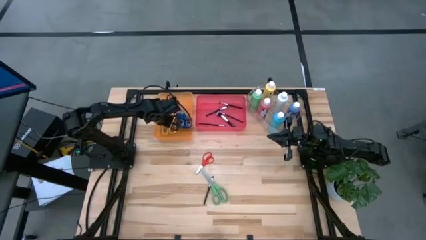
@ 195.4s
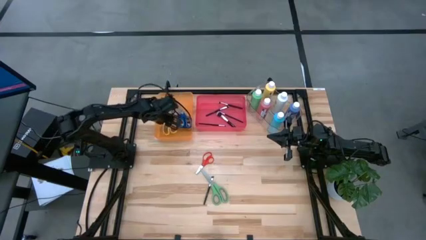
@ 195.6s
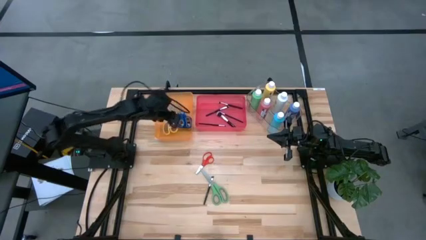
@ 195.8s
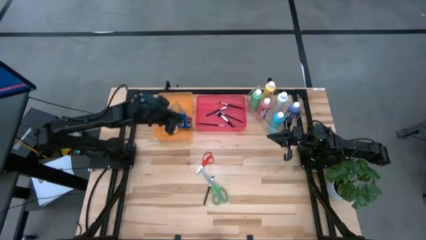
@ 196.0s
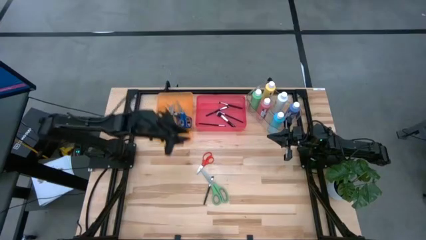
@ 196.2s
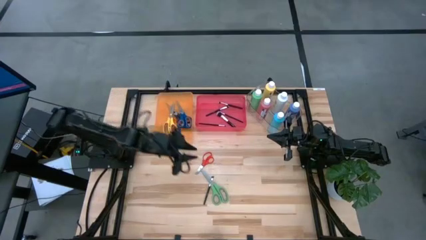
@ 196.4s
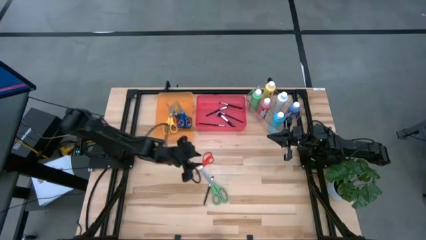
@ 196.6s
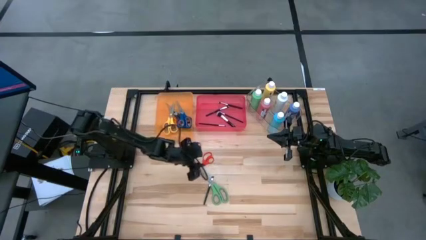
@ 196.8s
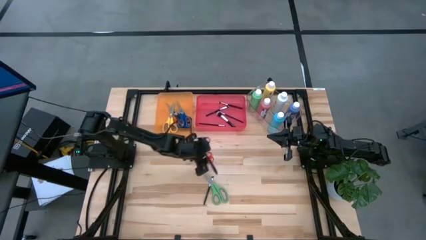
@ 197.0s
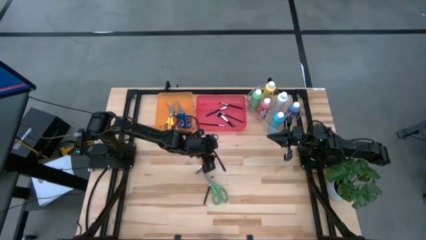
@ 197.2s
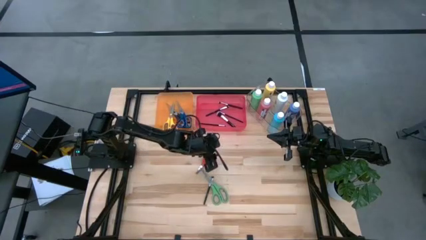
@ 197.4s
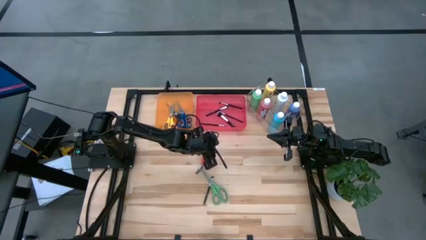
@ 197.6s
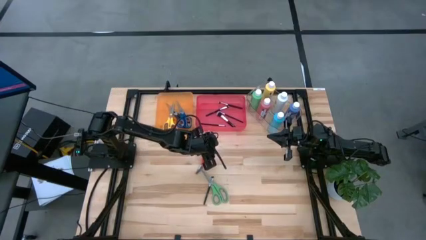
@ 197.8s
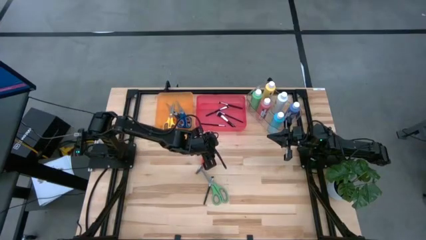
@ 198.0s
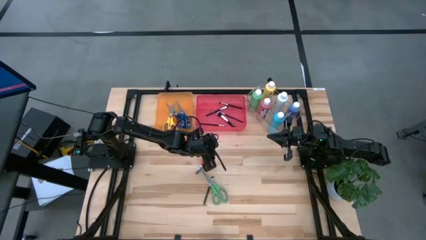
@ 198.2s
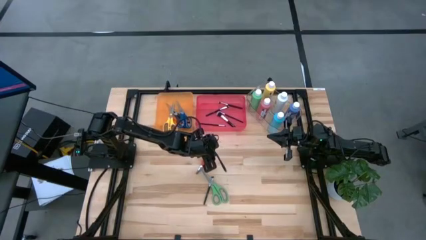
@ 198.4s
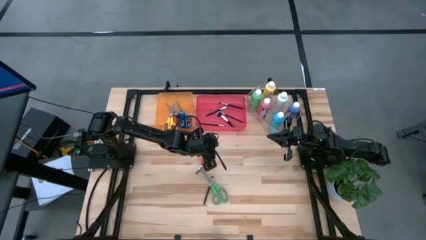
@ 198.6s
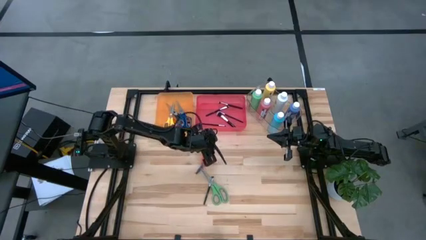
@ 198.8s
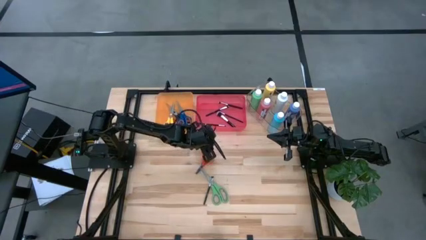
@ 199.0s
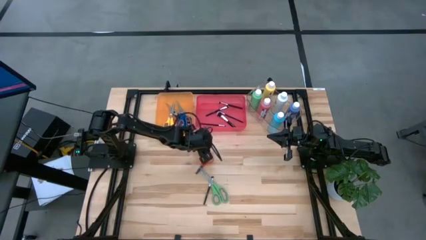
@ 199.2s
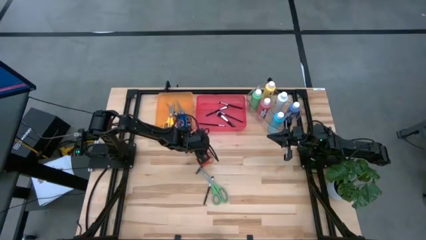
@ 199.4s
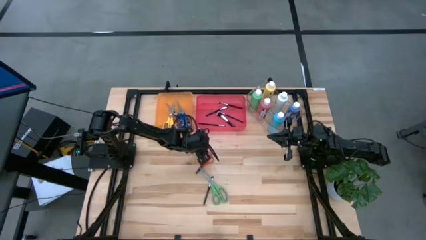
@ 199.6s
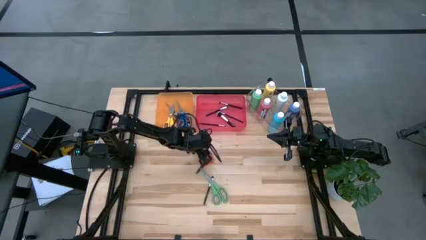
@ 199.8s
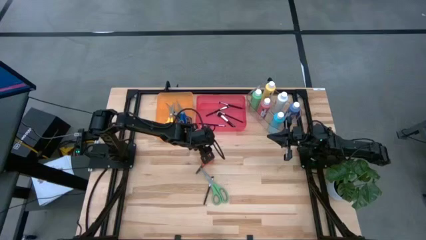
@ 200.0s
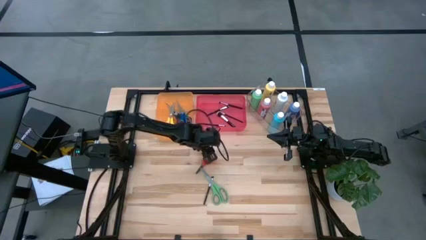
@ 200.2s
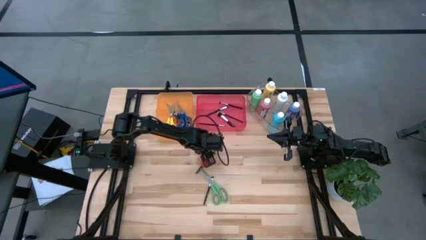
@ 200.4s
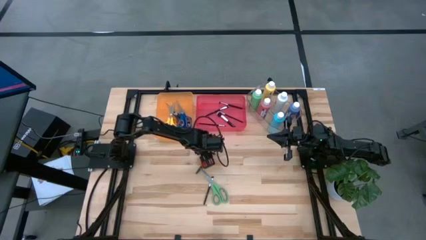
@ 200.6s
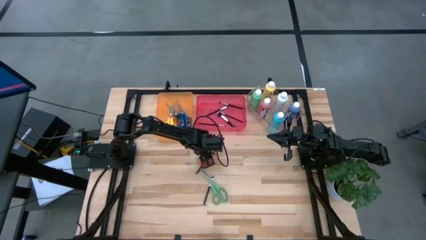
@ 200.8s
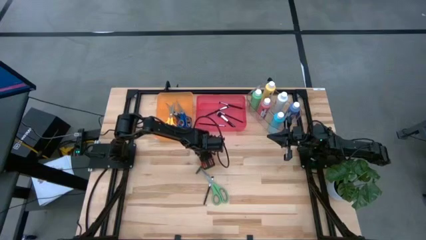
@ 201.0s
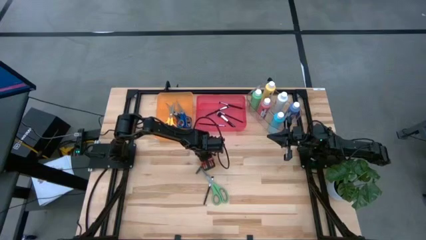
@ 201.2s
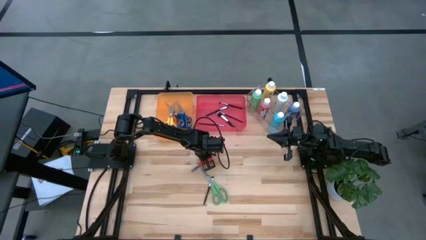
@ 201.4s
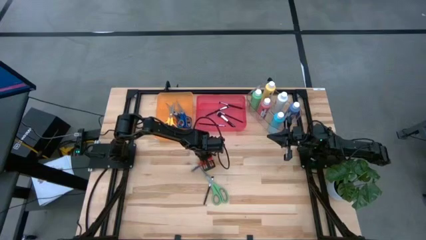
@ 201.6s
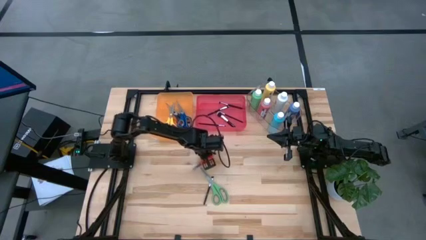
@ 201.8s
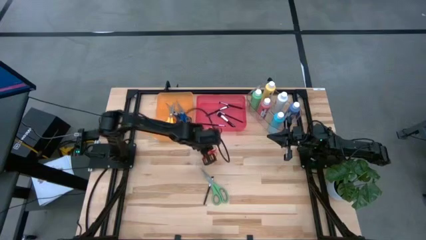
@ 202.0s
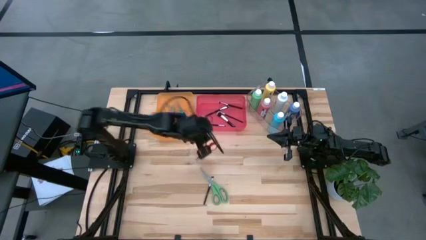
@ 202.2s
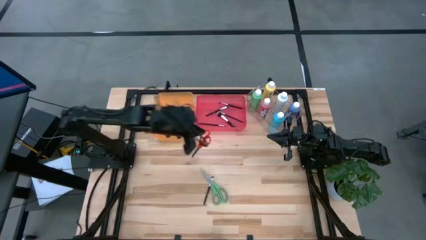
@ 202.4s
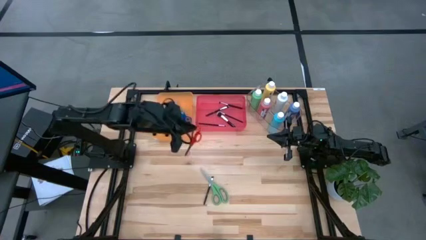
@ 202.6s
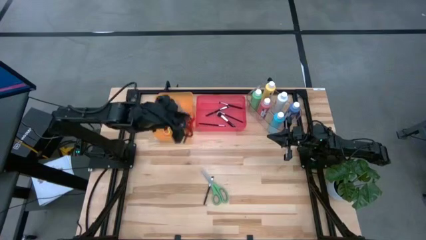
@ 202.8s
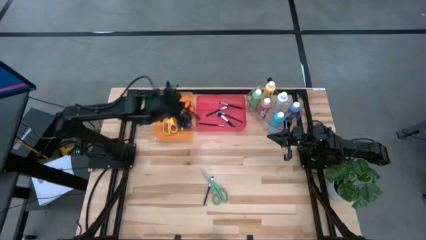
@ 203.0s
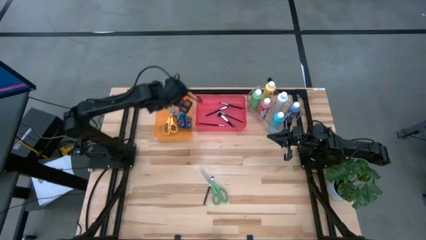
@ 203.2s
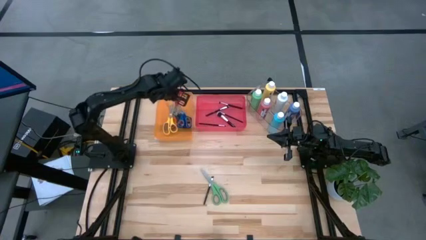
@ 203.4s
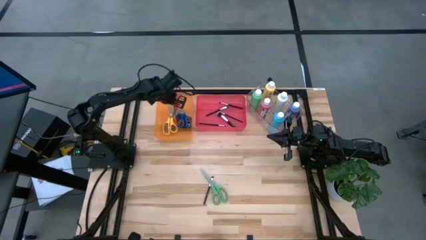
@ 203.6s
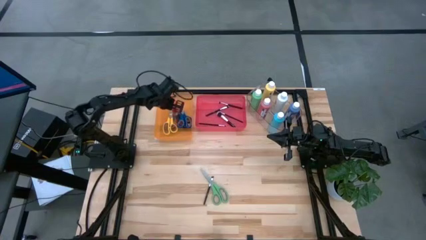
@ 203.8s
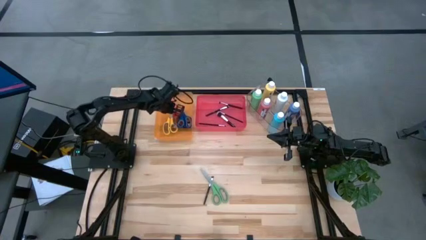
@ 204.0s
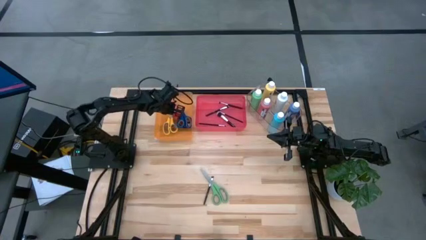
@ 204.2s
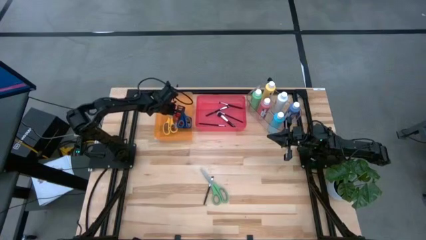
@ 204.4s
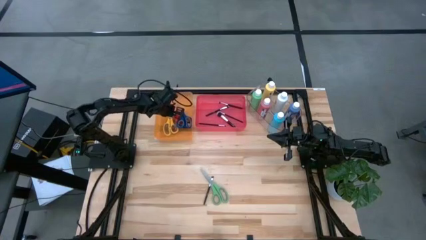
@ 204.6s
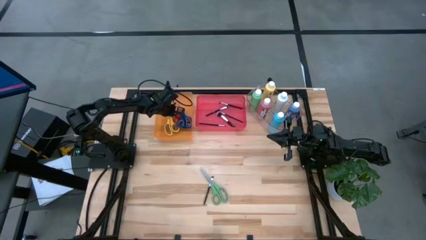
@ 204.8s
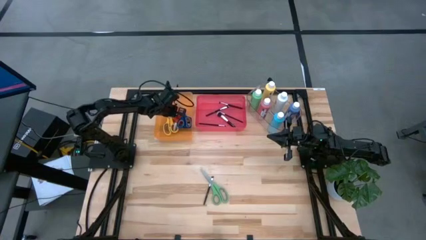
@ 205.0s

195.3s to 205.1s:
Task: Pick & Place Paint Supplies
Put the orange scissors into the orange bin

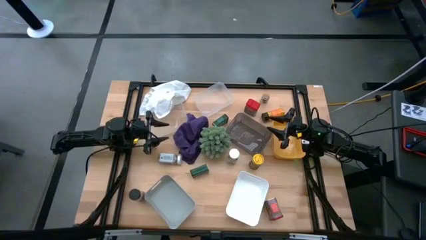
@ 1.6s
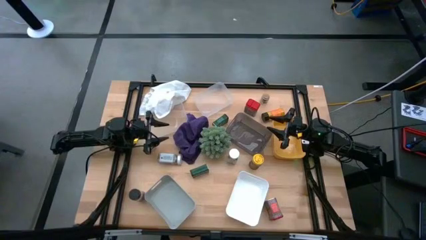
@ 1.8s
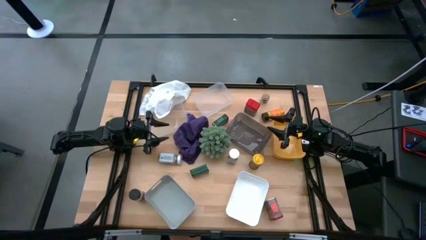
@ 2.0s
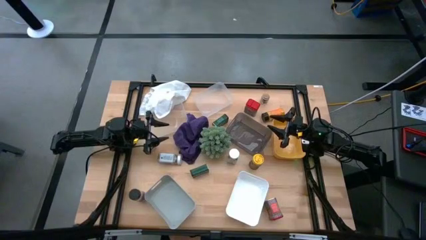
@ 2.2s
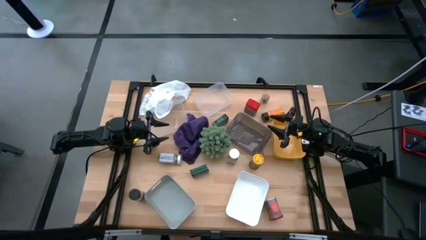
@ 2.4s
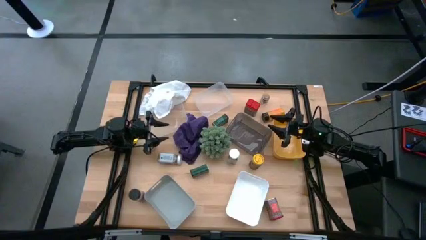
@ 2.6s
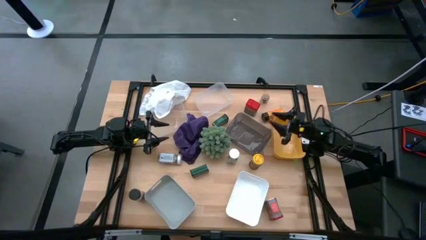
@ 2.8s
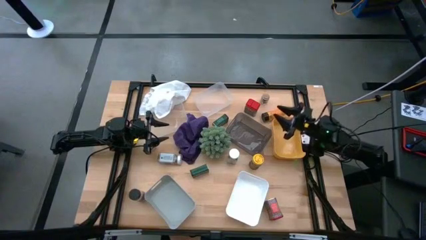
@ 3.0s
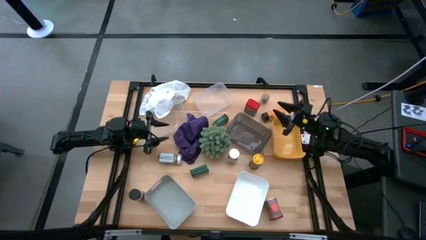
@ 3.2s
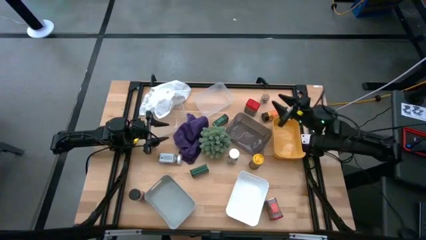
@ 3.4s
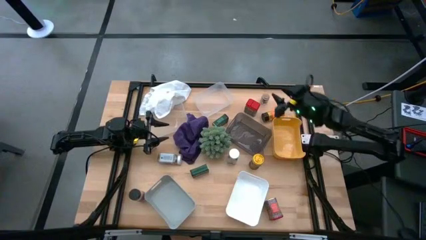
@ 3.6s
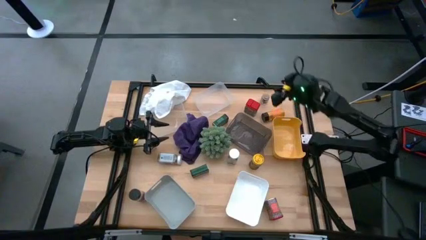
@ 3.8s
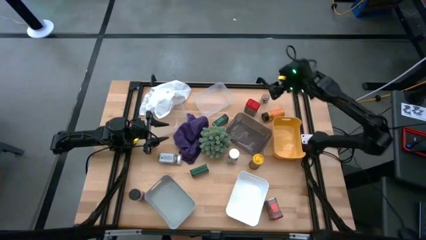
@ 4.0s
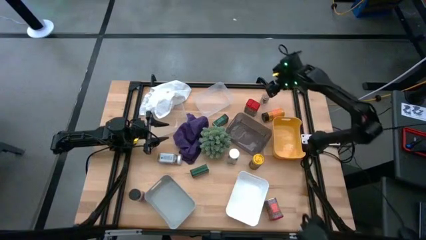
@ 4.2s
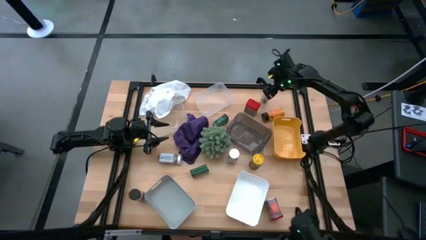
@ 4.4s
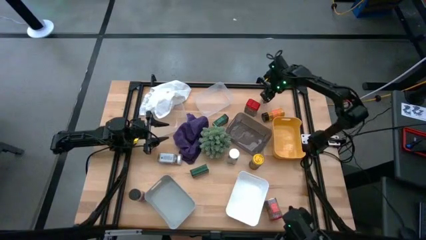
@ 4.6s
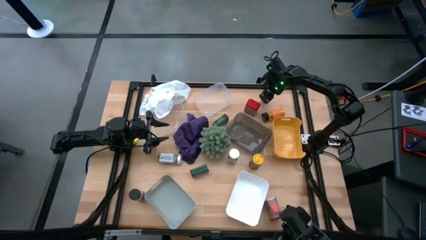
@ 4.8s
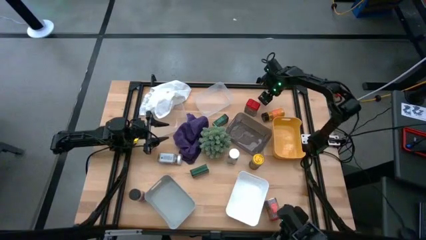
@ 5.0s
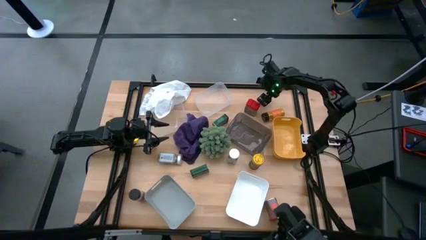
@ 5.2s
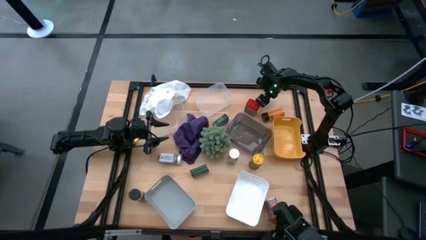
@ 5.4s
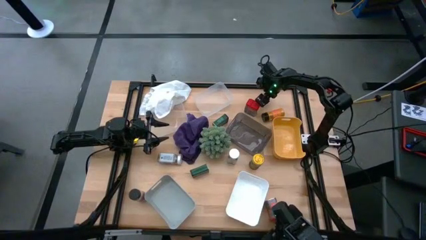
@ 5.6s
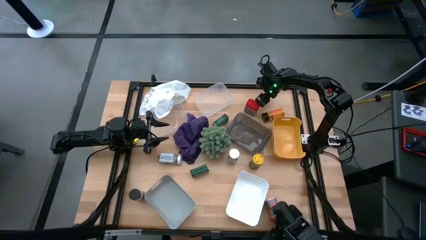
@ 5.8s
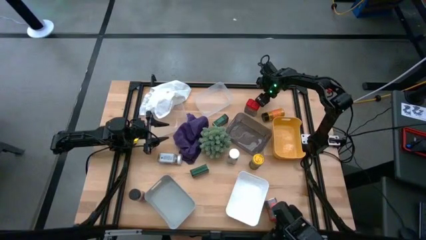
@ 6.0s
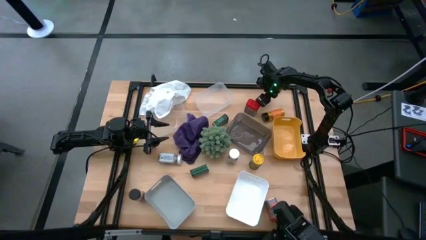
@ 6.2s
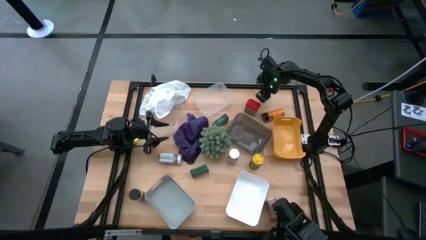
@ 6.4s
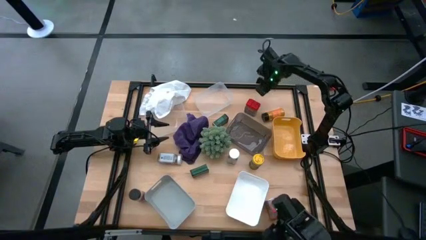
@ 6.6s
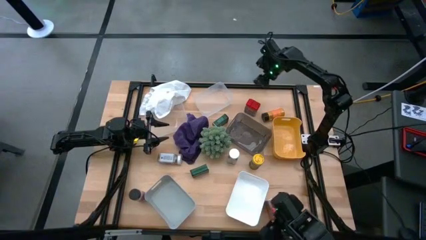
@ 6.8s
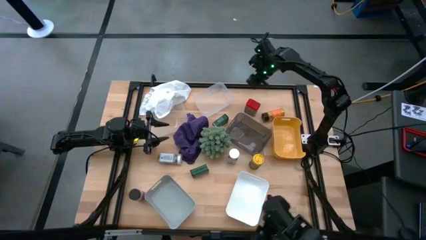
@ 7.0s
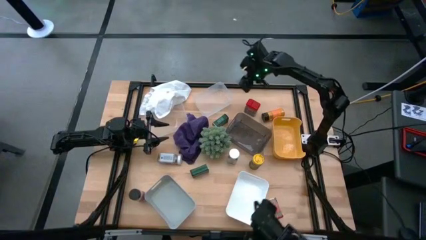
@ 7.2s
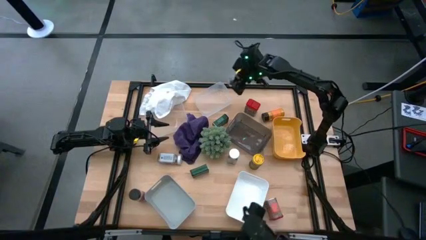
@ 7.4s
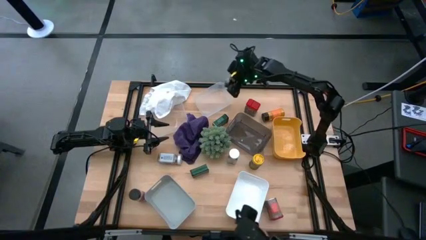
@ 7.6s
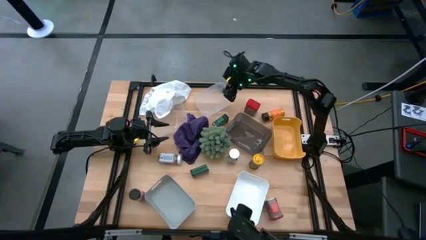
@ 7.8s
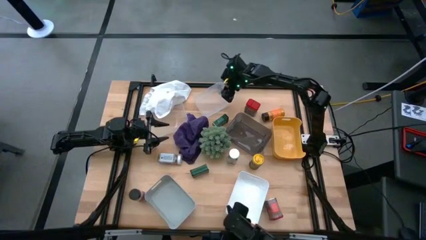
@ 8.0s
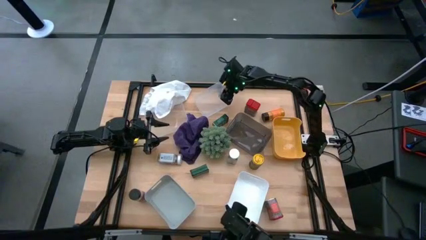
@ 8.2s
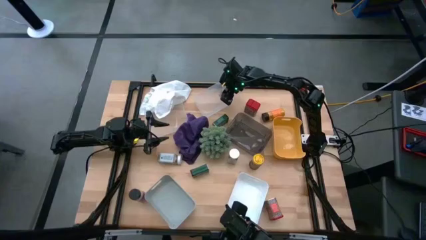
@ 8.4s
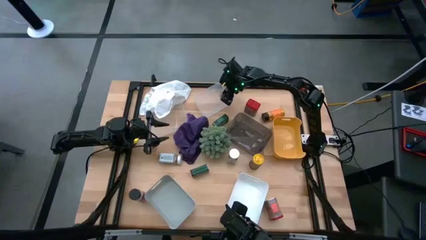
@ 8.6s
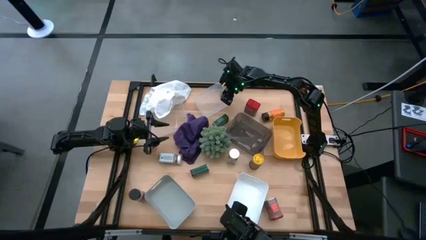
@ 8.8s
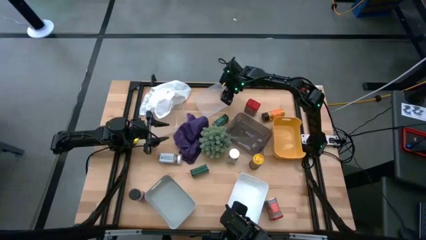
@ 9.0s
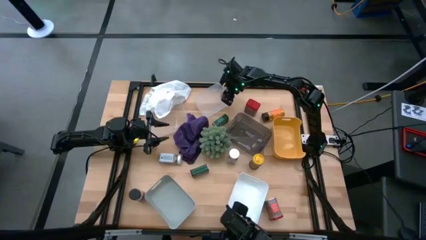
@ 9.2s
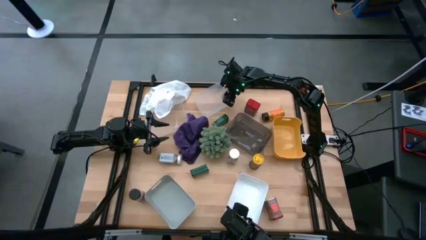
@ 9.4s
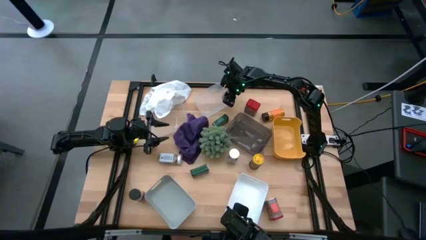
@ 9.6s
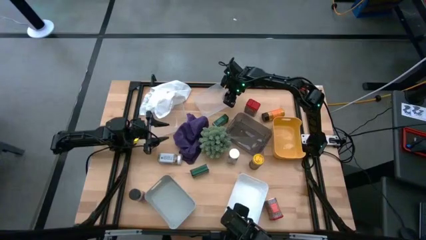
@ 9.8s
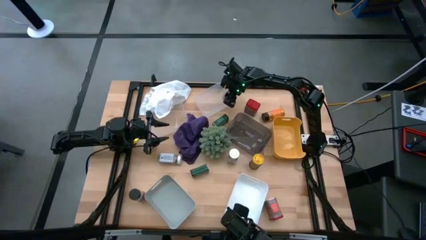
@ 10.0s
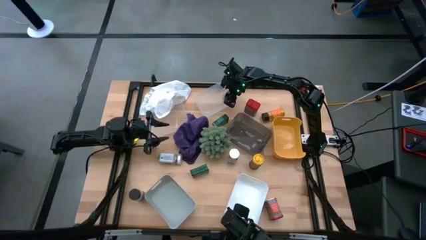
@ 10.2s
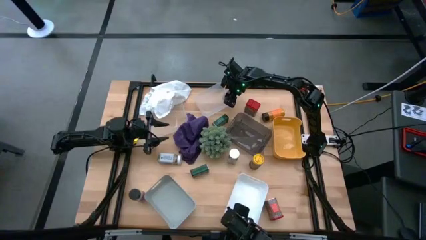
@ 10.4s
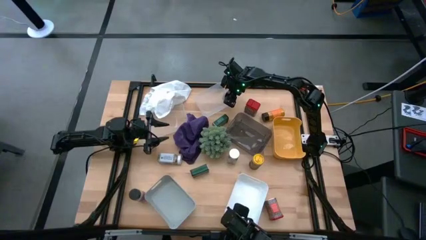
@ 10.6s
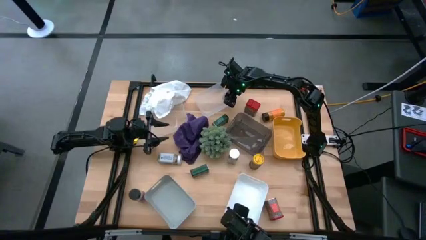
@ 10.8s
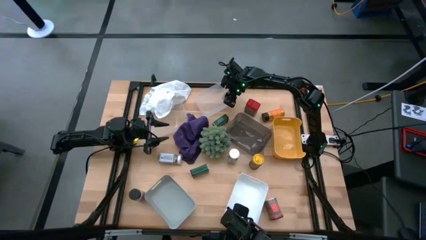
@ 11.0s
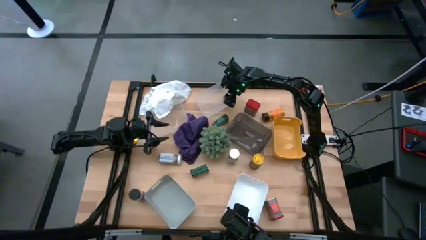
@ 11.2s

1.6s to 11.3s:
Task: Sort spices by type
Put the right brown seasoning bottle into the right transparent bin
